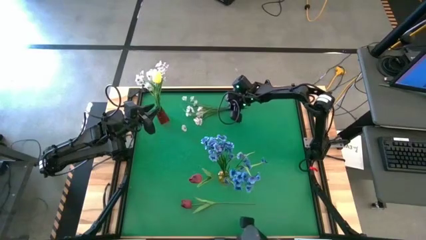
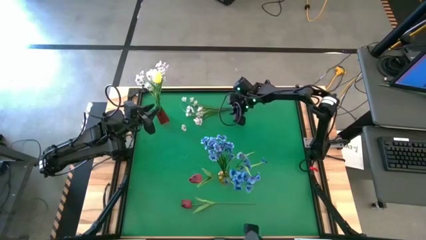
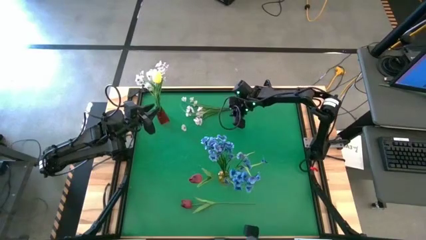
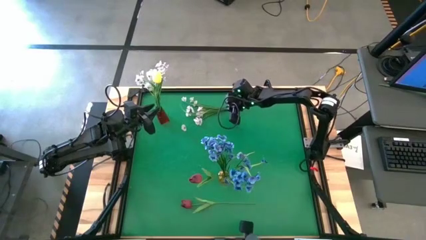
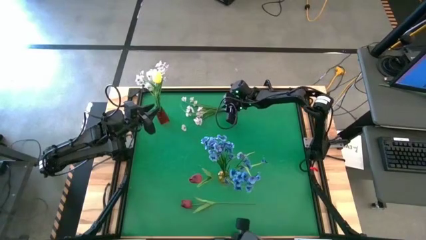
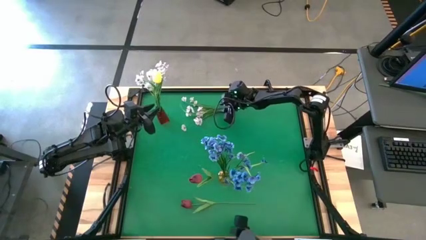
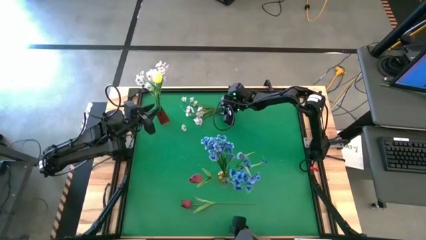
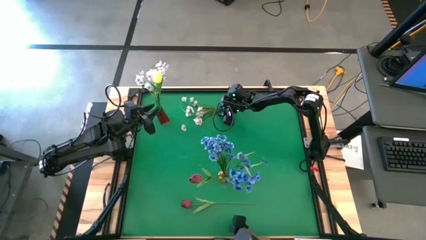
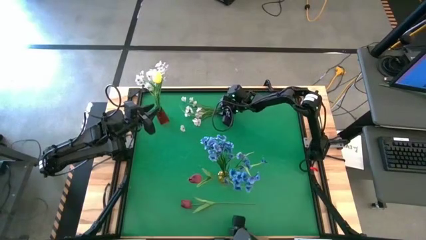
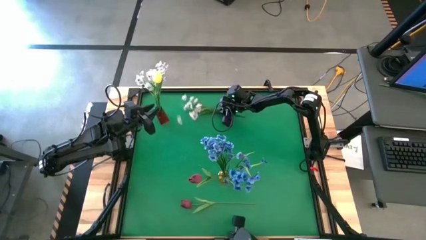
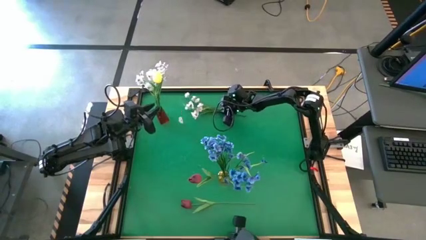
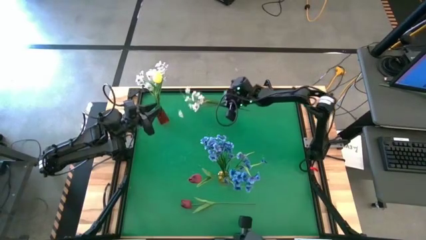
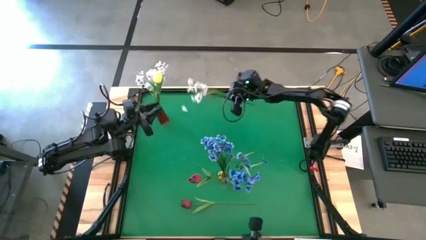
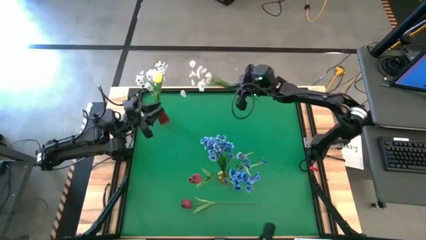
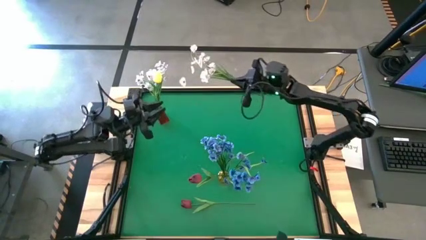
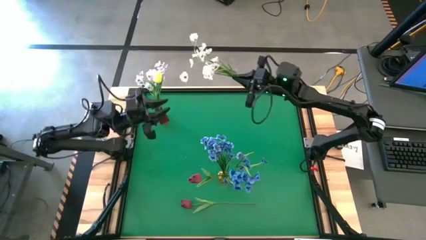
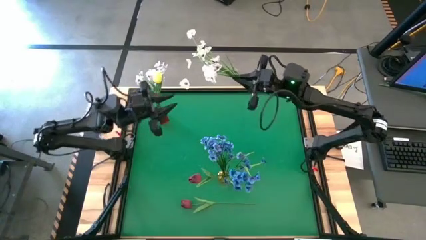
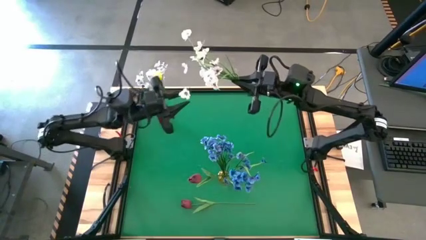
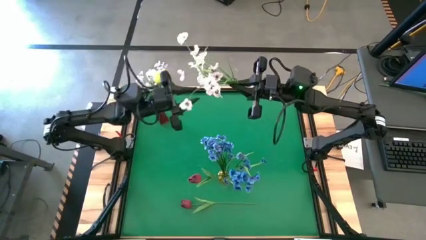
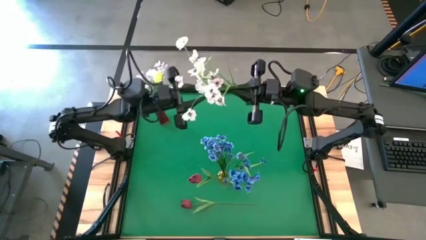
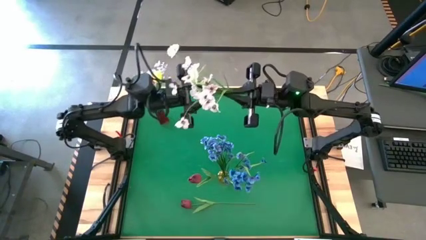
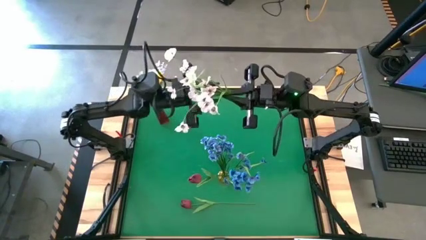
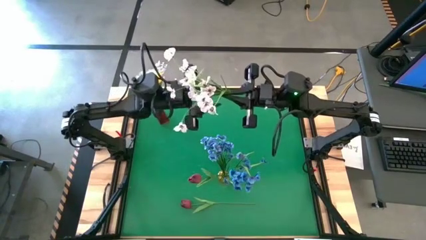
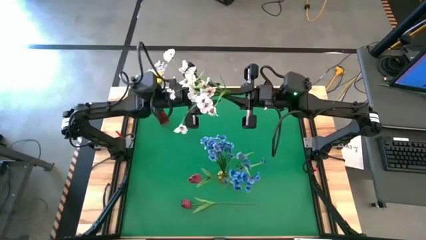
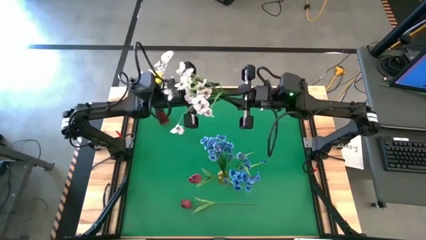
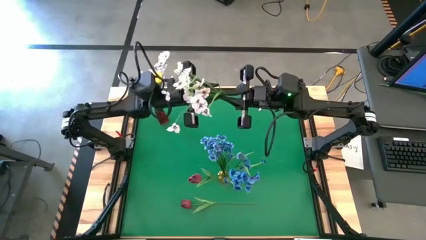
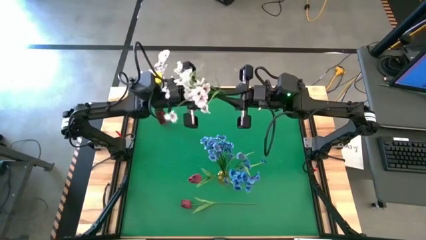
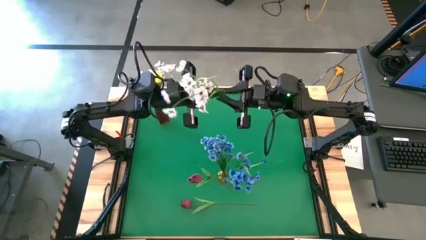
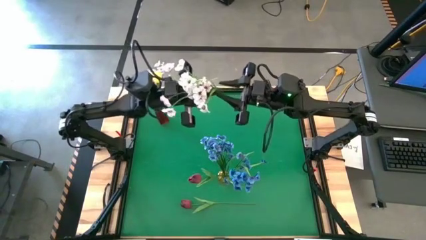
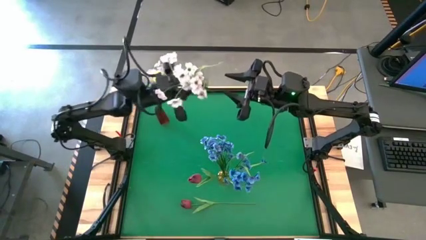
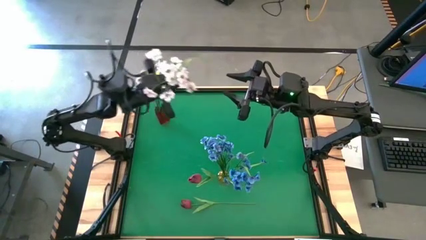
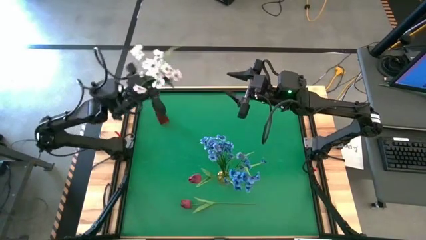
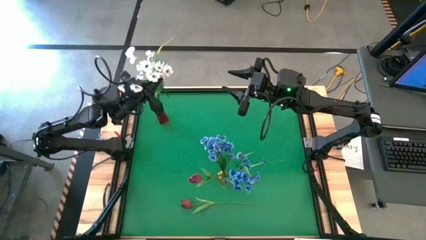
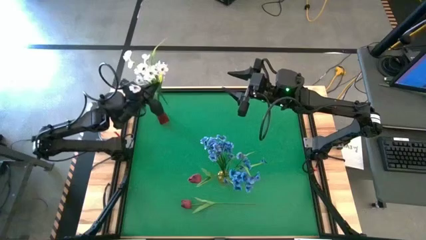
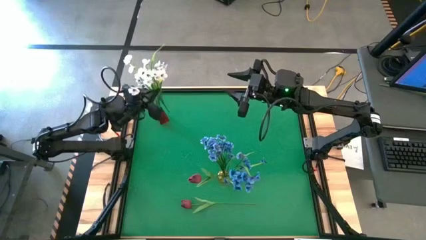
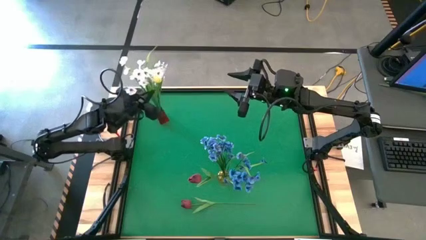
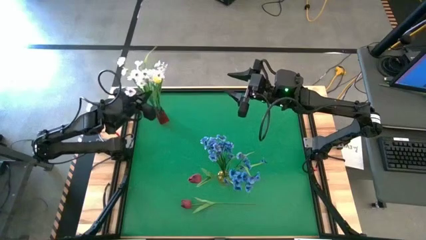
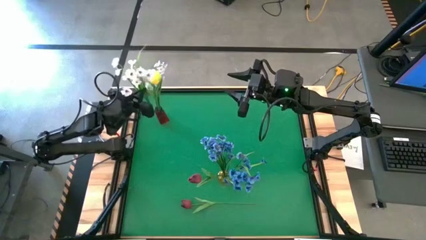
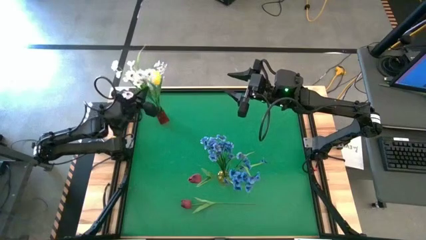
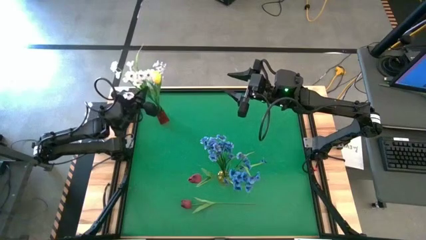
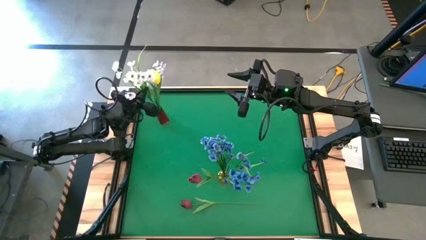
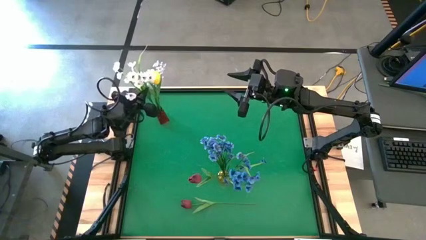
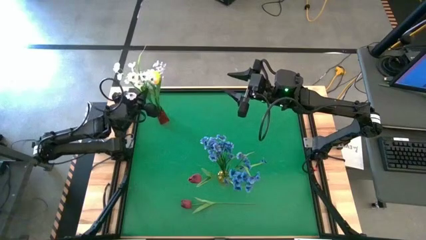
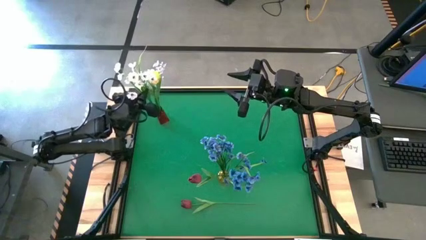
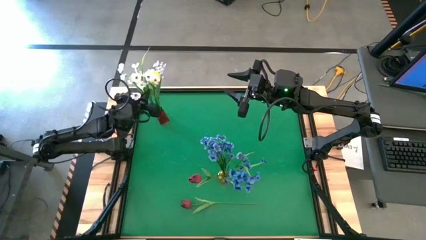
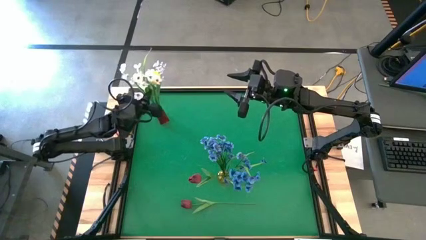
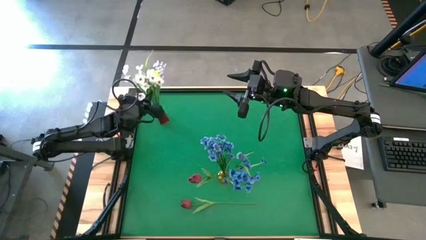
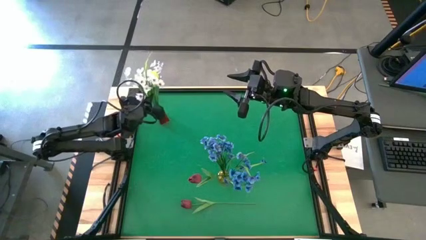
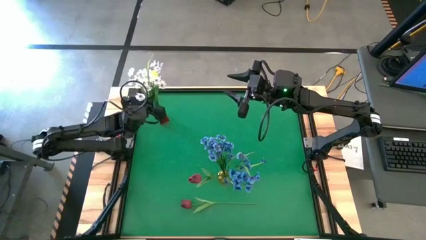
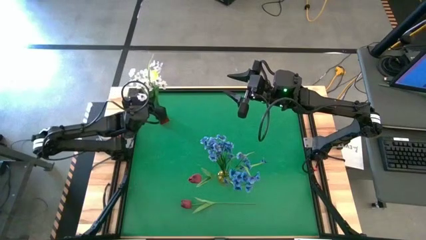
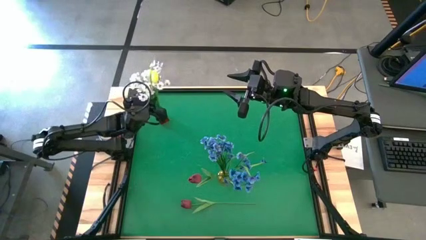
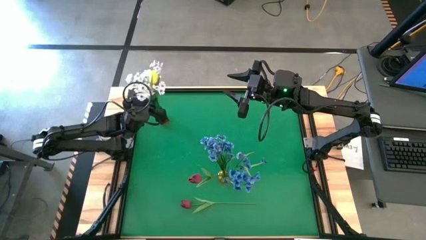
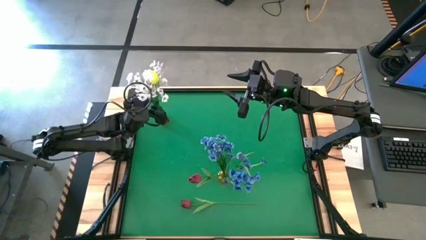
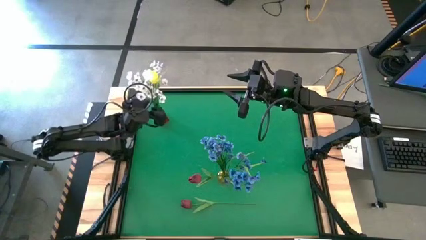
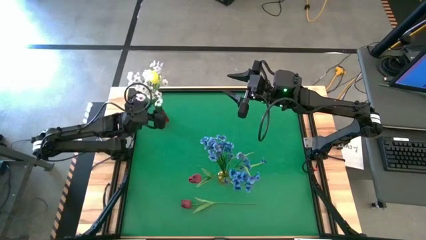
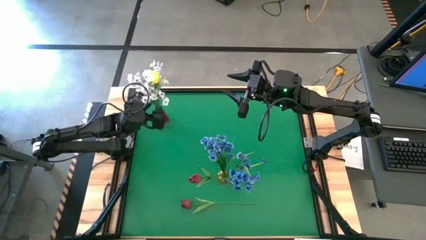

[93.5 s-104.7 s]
Task: Sort flowers into vase by color
Put the white flowers into the red vase

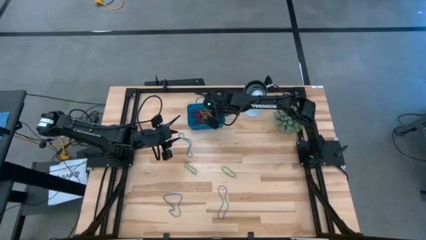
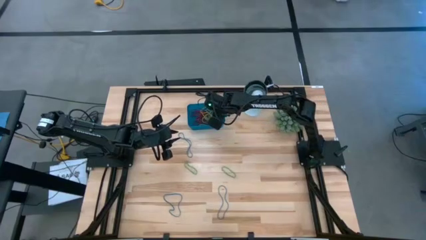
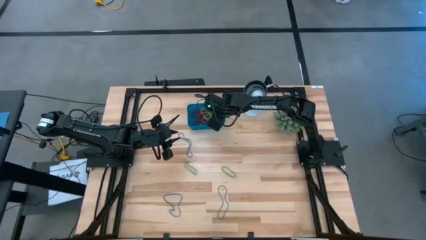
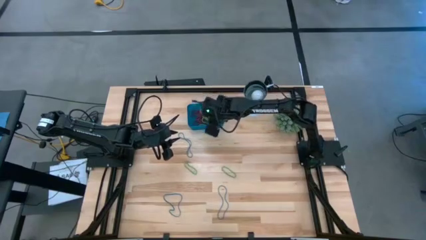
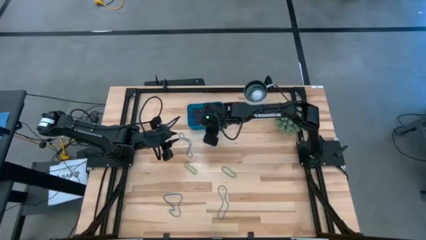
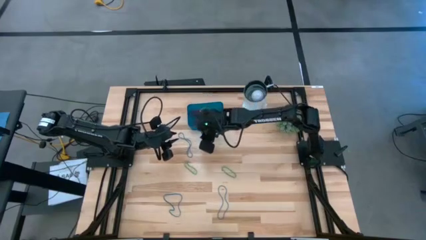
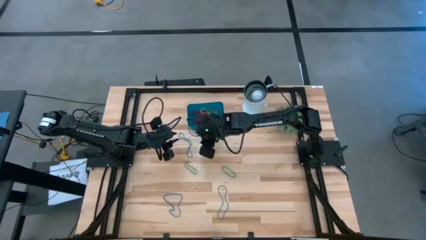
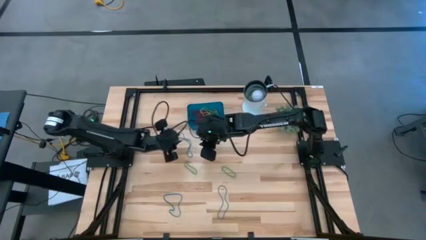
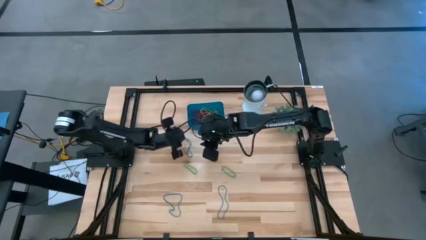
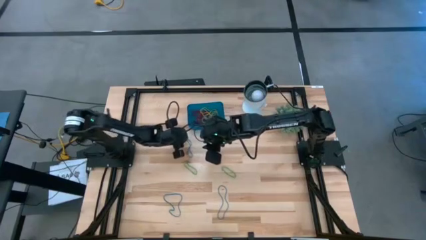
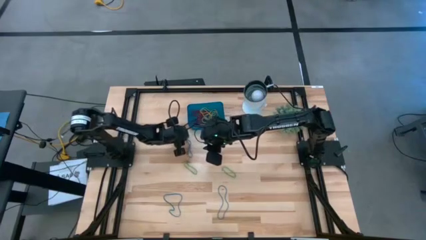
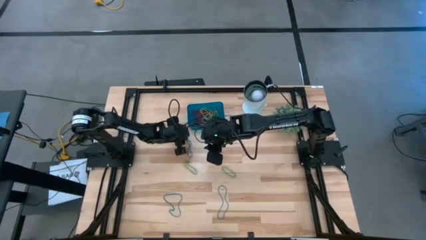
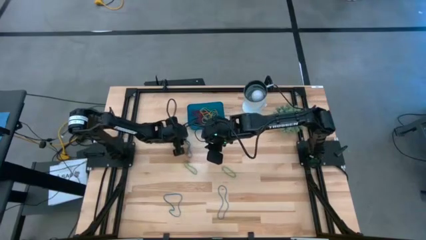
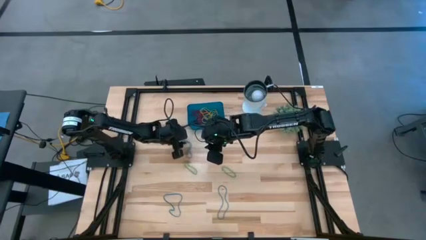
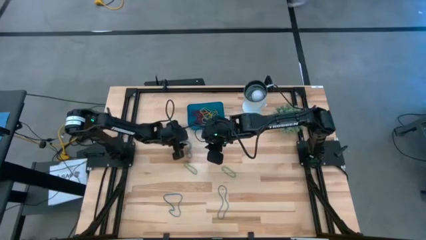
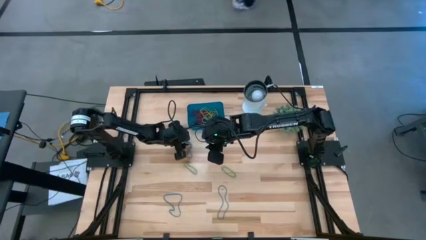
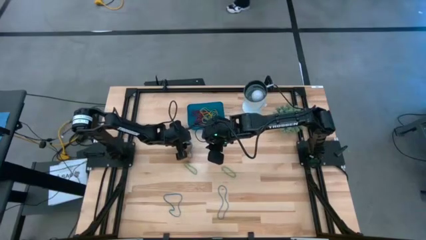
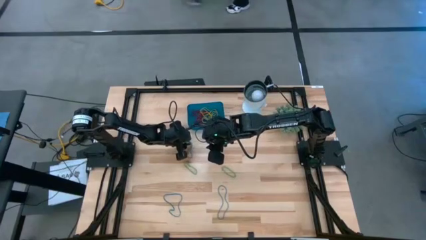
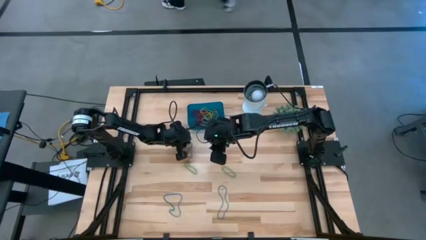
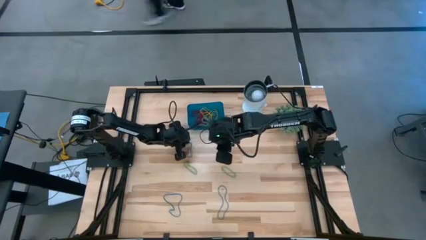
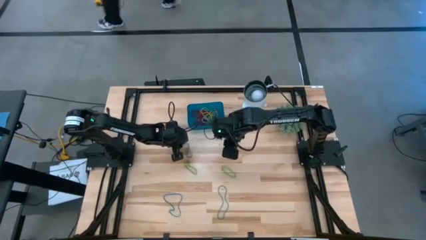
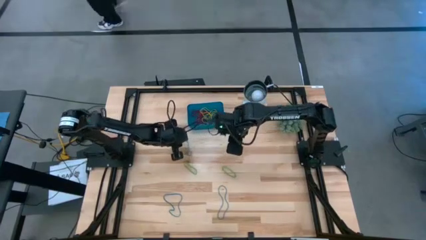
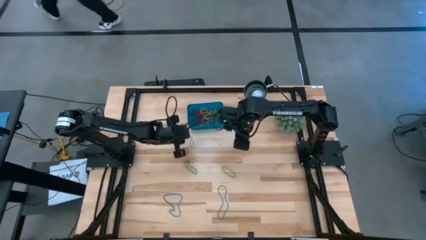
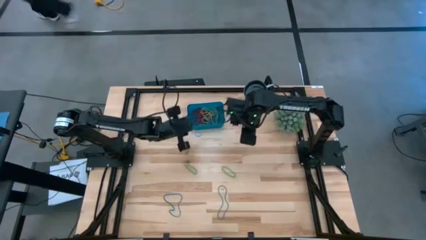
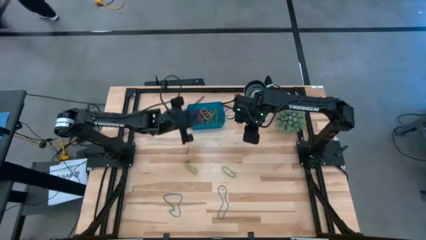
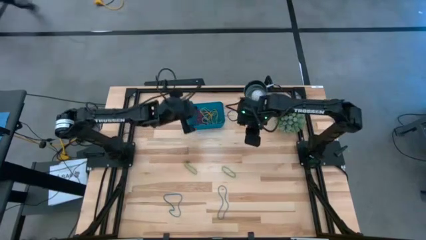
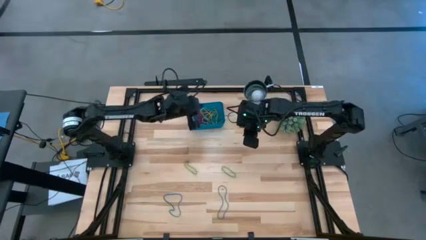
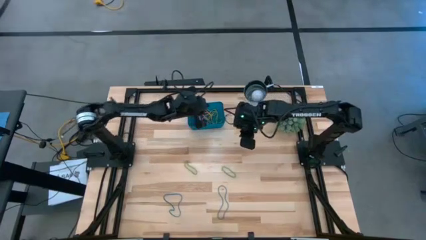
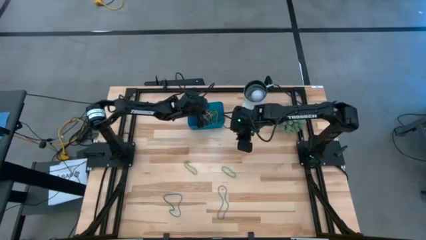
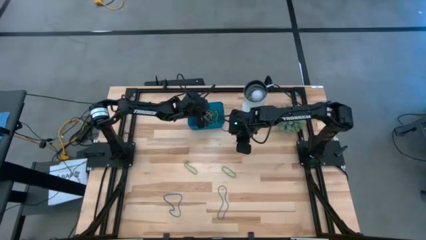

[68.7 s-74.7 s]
Task: Pick and place items into bin
Put the blue rubber band into the blue bin
